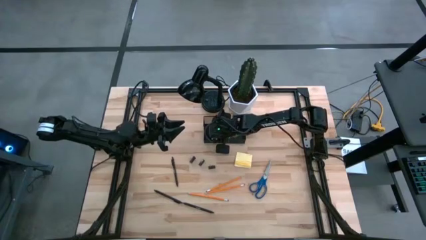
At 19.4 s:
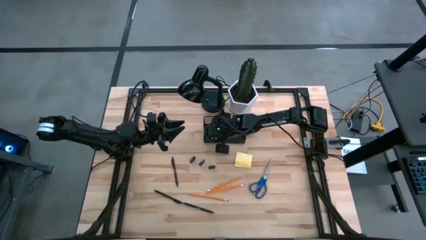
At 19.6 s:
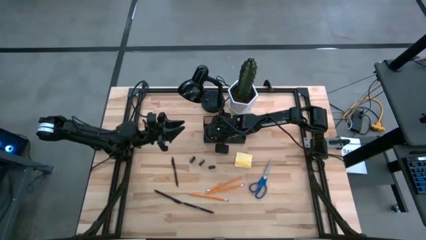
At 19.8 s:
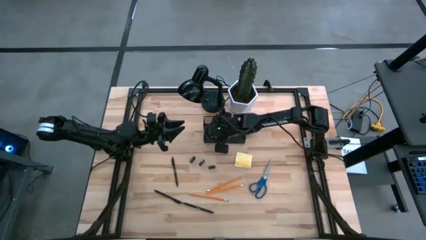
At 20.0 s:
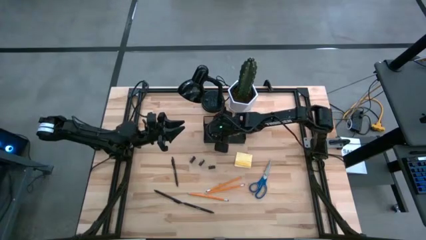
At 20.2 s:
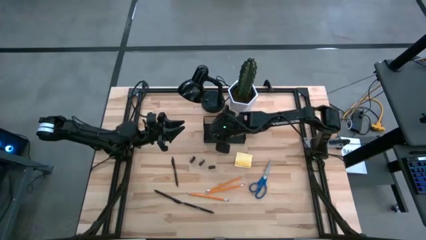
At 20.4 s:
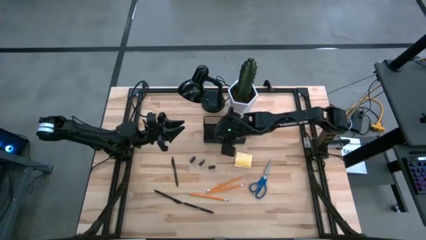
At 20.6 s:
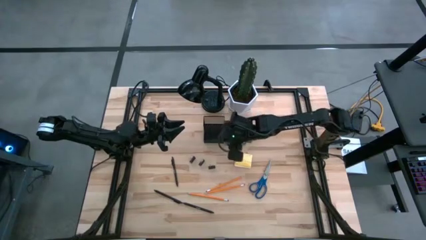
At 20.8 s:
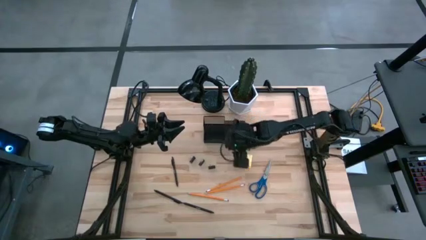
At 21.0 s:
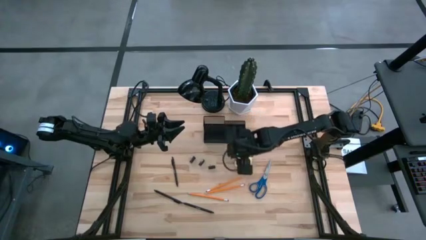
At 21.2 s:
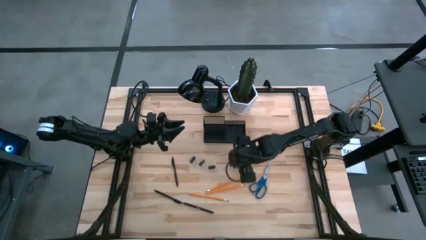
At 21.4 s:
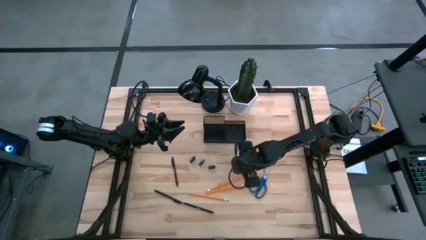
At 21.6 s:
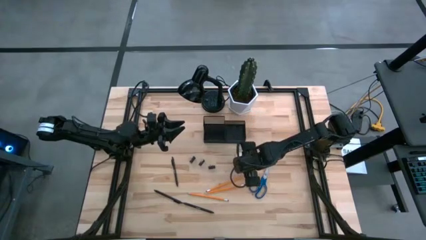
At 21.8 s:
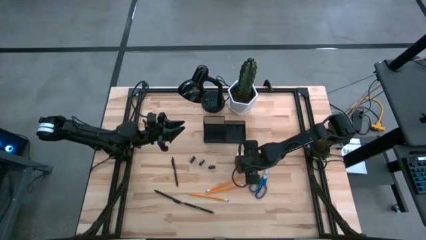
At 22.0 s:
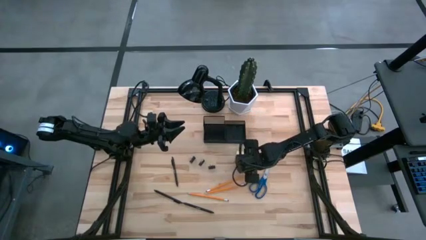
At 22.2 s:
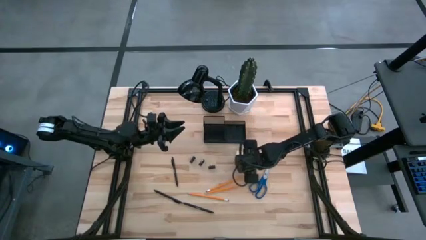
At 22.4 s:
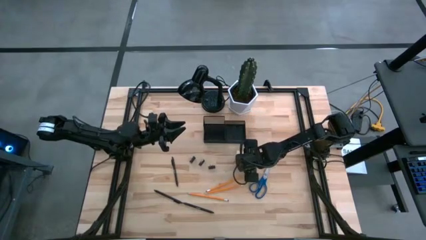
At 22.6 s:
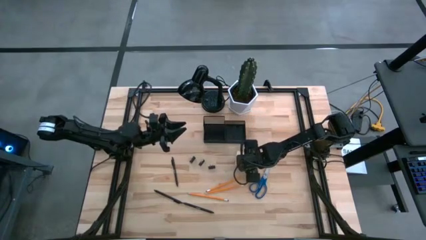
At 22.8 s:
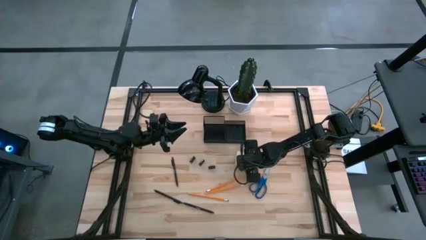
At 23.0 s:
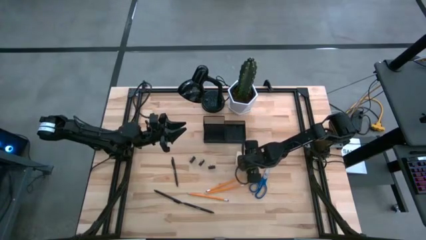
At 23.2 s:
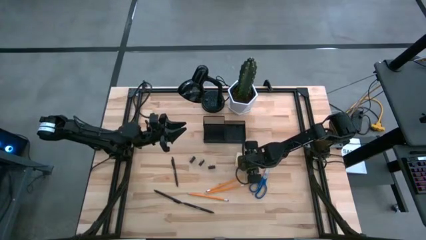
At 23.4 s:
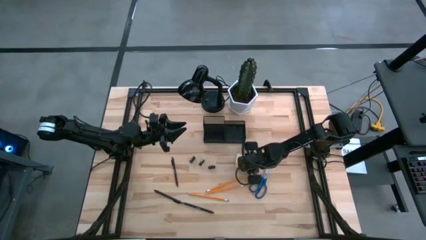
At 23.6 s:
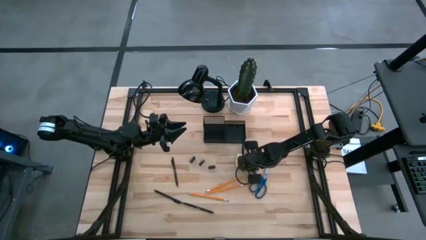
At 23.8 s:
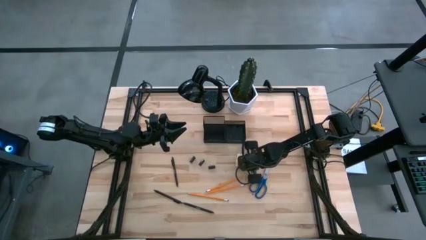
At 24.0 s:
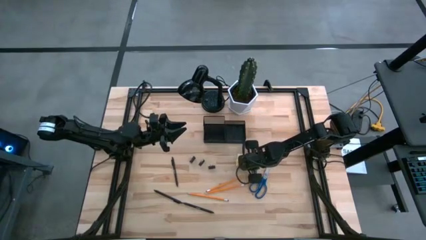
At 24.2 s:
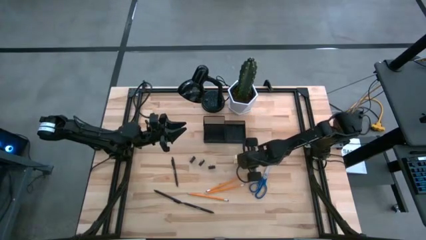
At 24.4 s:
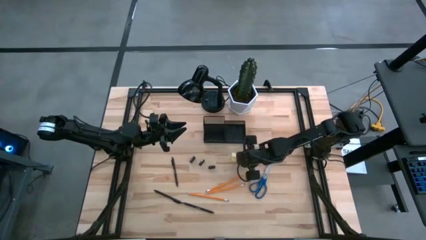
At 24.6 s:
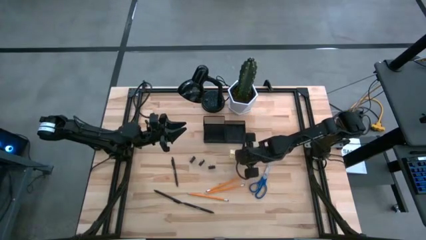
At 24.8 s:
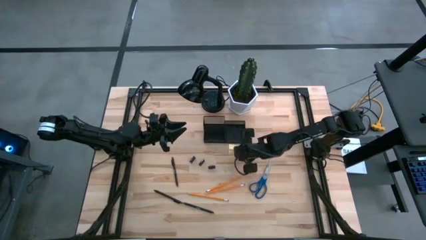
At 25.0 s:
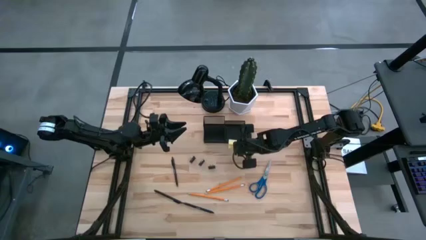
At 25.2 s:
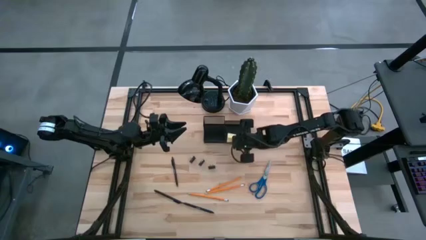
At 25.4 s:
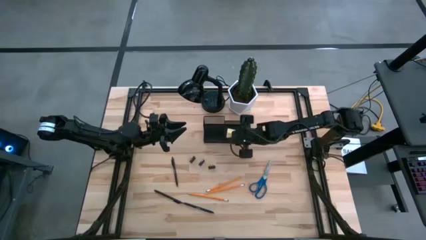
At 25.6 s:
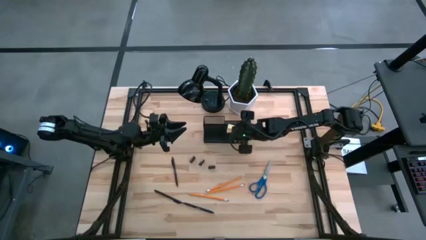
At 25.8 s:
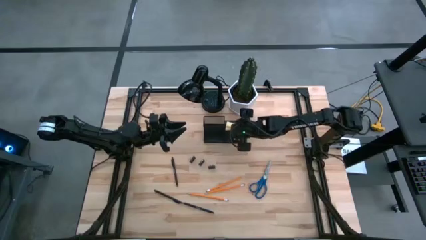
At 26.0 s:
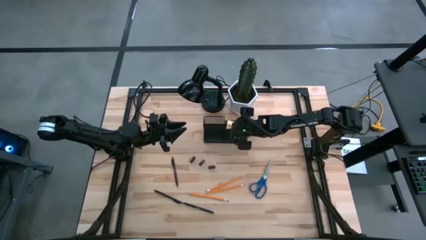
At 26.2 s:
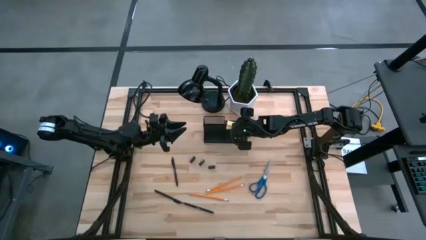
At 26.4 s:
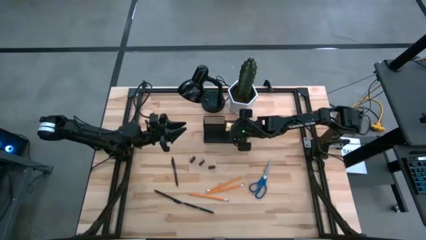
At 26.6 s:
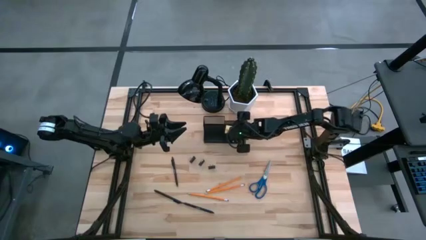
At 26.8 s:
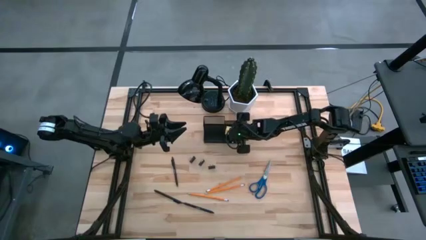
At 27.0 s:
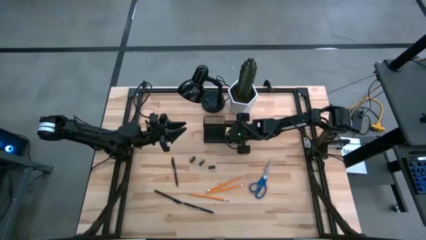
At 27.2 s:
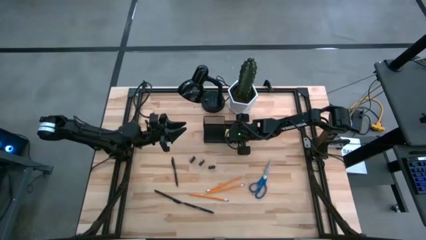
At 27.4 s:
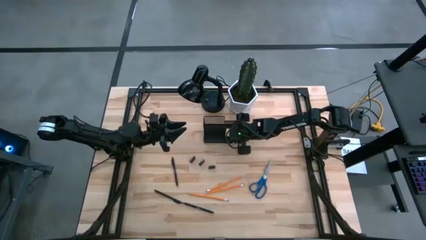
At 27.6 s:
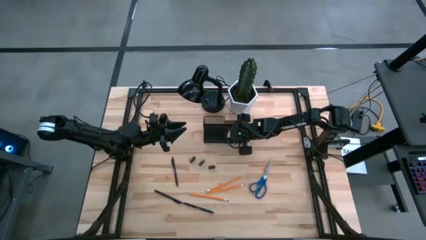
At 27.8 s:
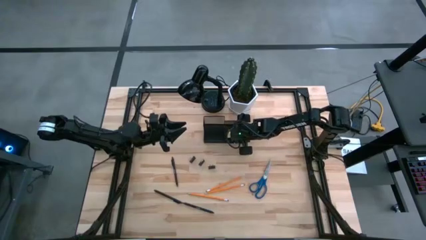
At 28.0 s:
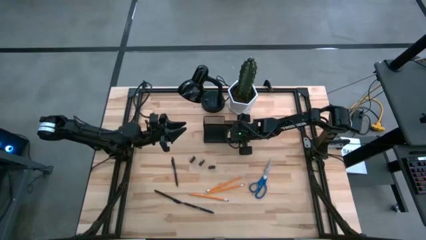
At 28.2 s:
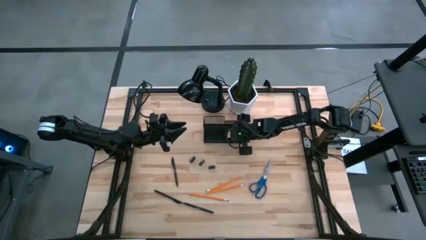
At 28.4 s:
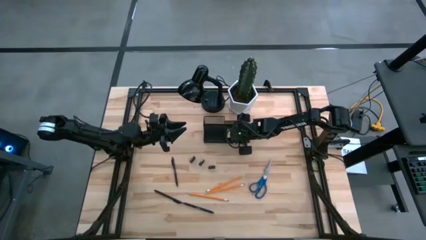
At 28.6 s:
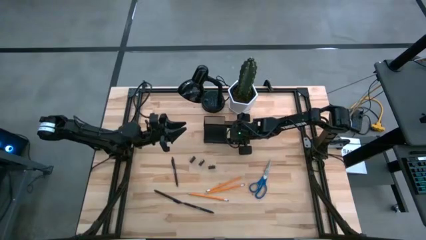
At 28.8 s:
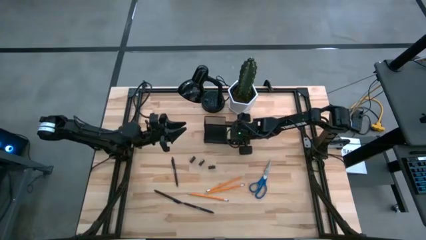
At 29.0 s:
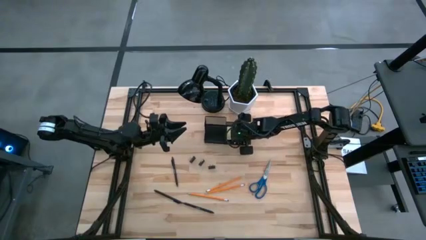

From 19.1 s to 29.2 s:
Task: Pick and place office supplies into organizer
Put the yellow sticky notes into the black desk organizer
